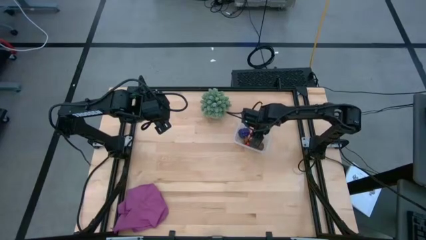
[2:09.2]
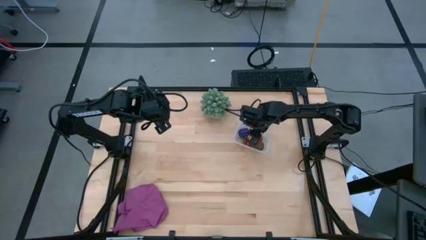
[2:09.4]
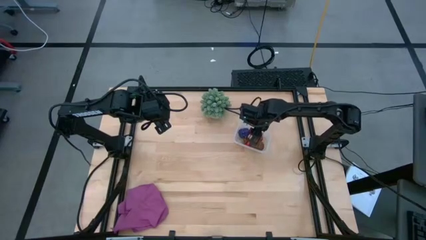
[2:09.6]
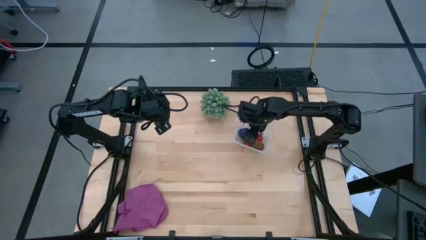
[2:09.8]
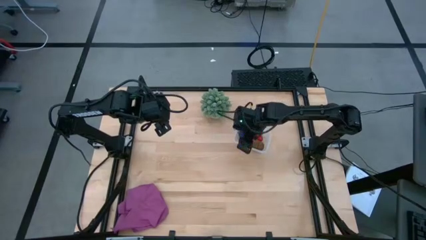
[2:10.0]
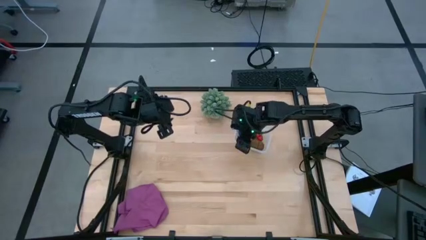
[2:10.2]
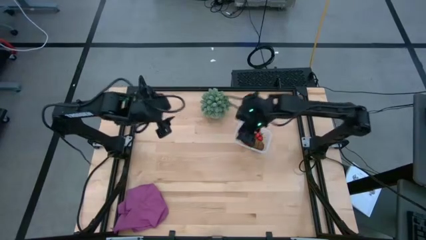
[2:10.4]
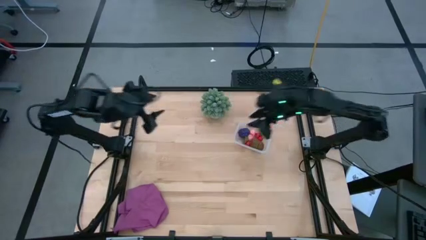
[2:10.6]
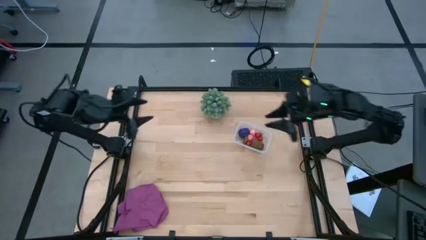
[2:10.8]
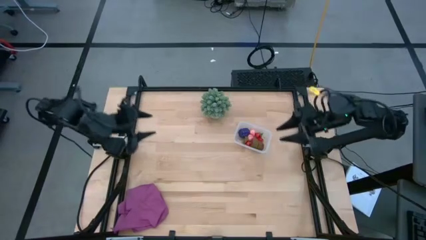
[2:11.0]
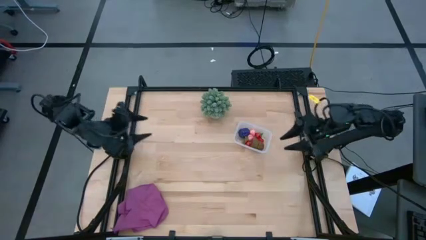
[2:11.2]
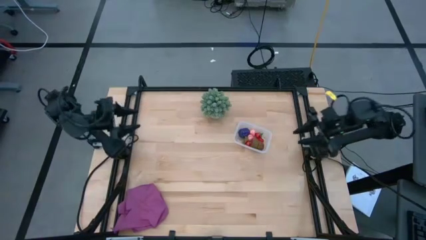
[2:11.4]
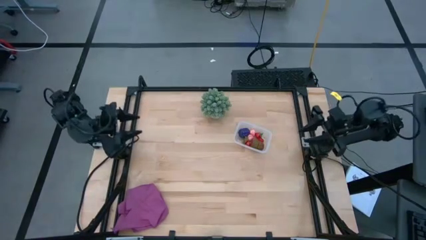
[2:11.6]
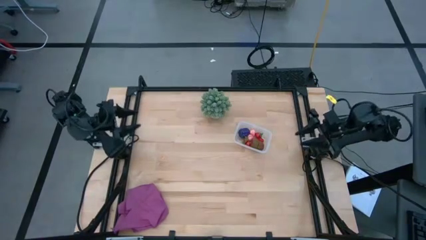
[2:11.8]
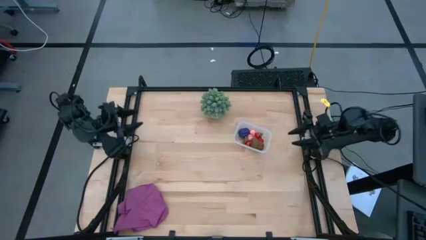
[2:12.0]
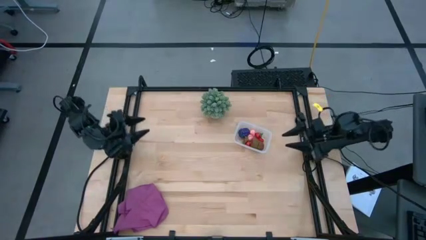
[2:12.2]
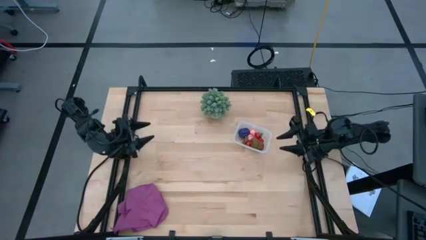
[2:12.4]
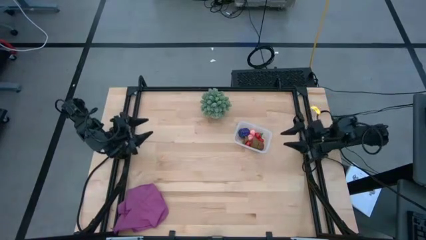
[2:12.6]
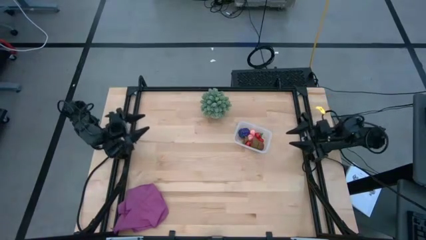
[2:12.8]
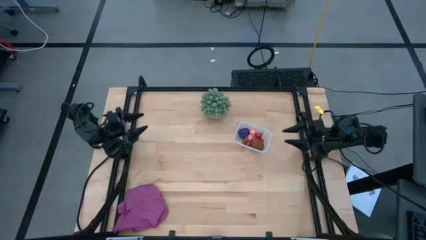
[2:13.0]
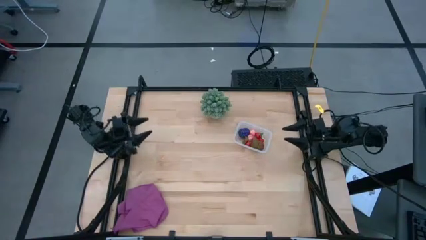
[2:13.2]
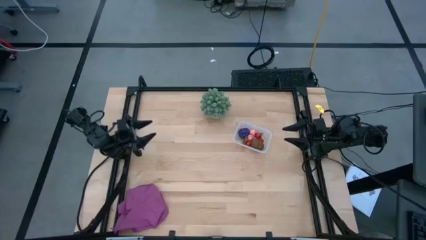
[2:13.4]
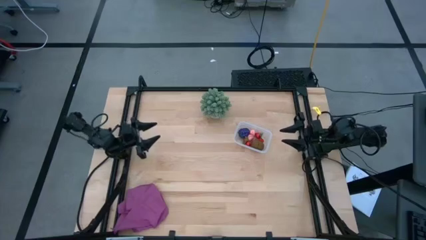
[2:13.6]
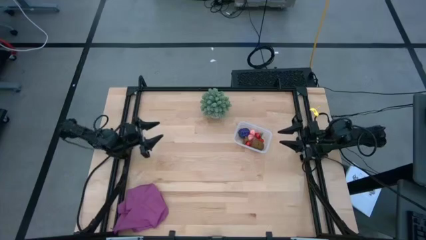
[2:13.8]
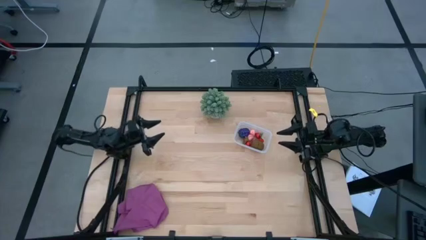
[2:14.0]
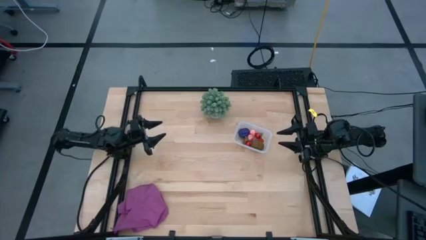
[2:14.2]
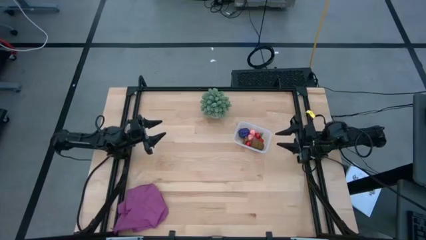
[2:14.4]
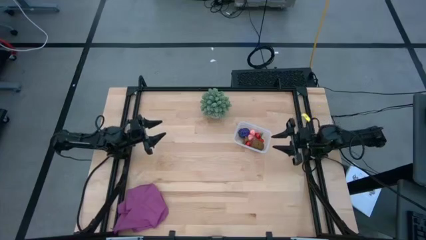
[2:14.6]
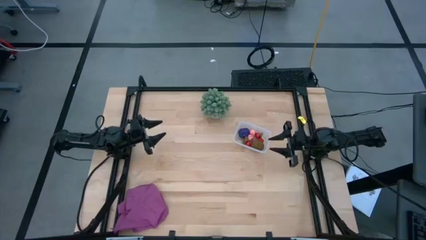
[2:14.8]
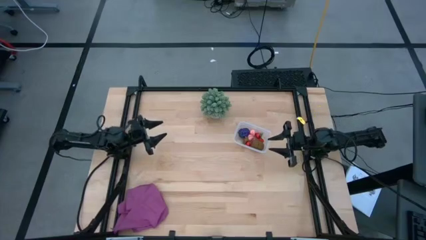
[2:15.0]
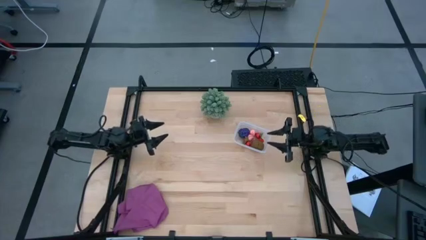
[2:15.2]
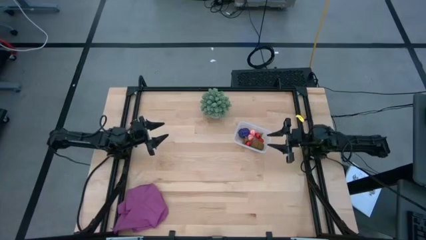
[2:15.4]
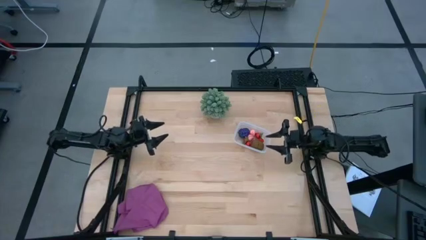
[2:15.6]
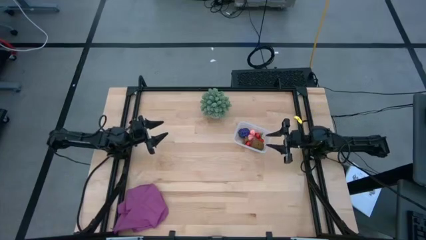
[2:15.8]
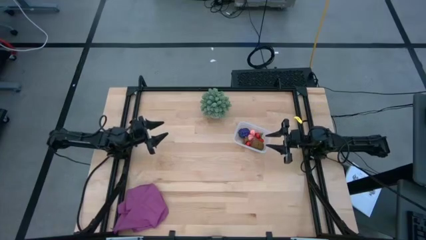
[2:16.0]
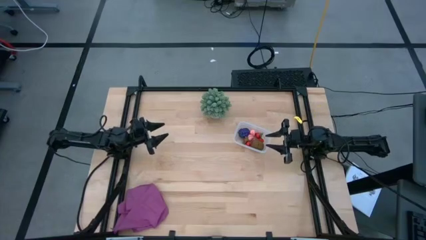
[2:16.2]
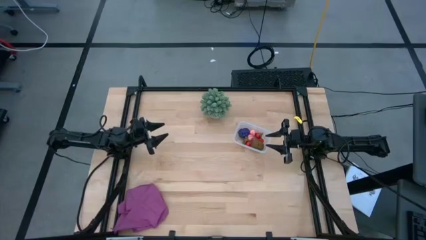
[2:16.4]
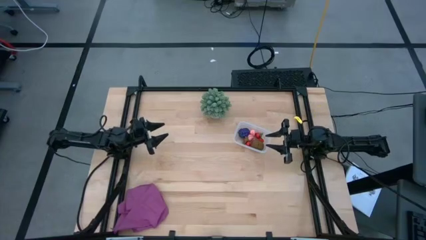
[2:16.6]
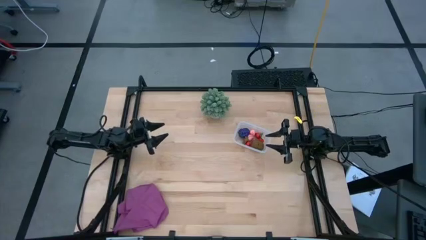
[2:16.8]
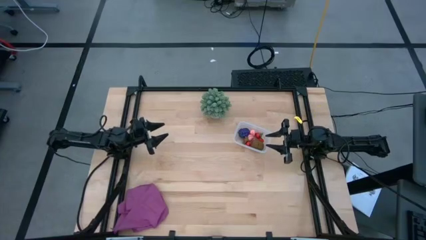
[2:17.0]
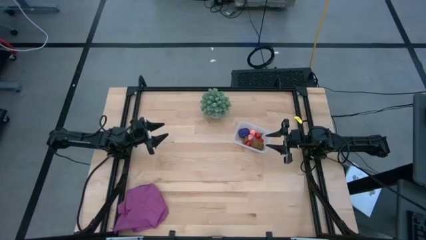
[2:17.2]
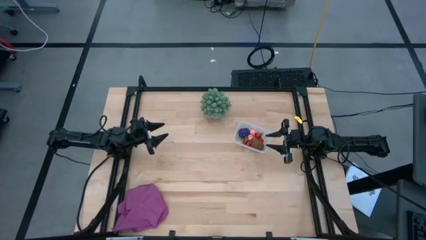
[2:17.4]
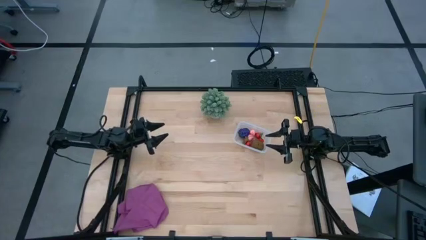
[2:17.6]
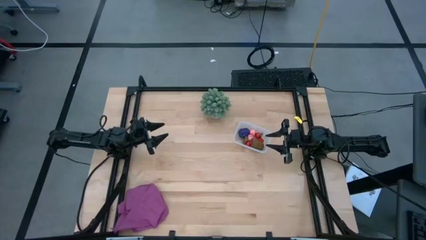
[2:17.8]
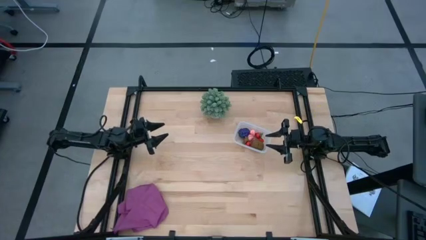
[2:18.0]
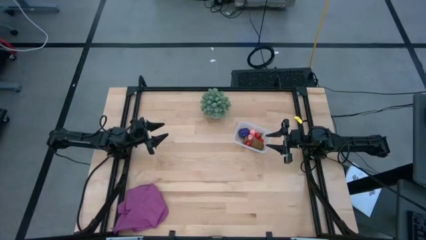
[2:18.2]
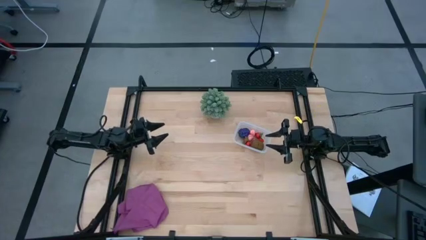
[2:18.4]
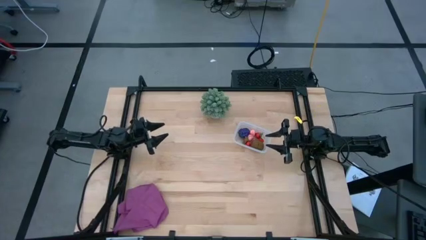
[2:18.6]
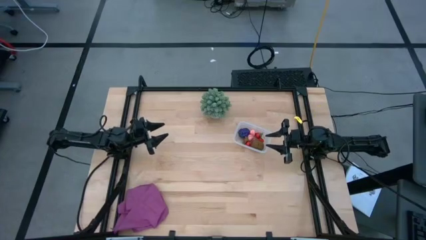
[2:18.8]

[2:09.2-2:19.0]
Task: Pick and placing Produce into tupperware
Return to Home Position

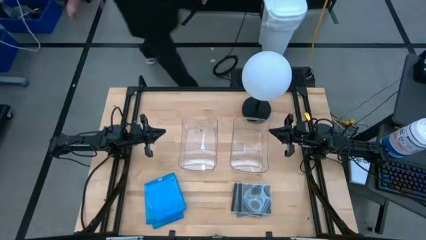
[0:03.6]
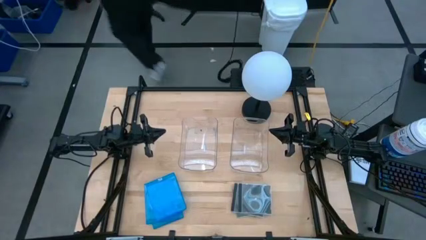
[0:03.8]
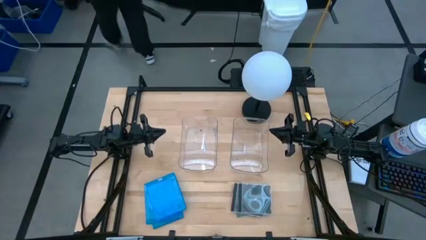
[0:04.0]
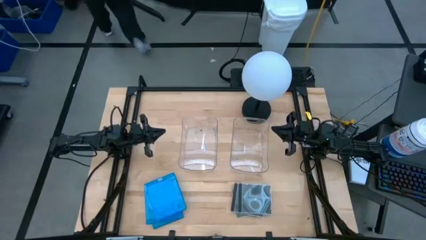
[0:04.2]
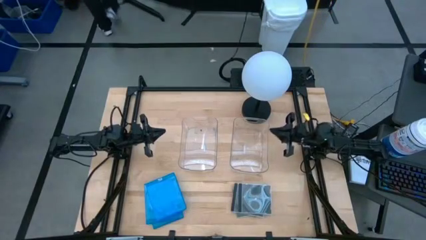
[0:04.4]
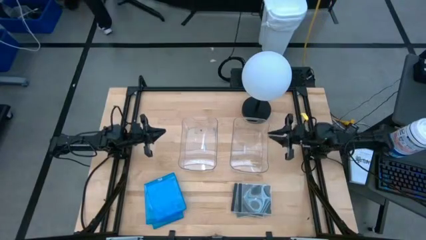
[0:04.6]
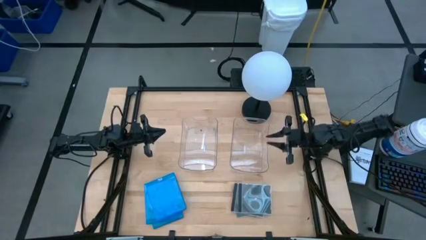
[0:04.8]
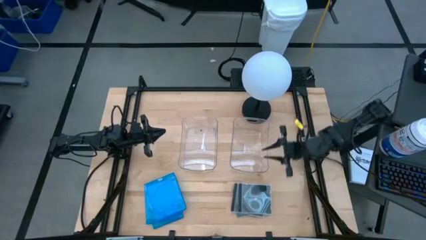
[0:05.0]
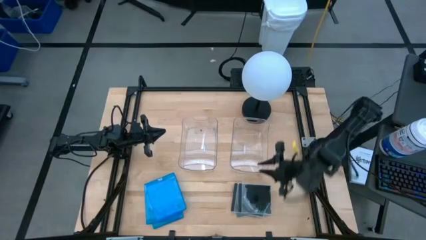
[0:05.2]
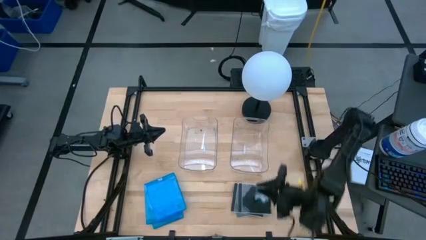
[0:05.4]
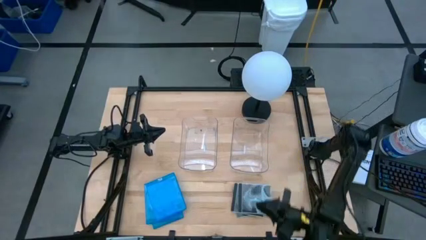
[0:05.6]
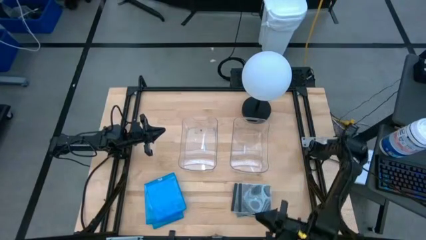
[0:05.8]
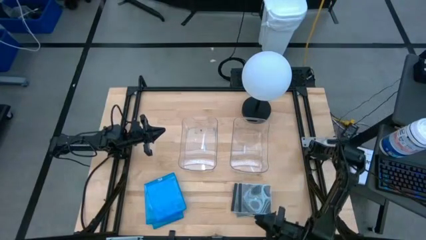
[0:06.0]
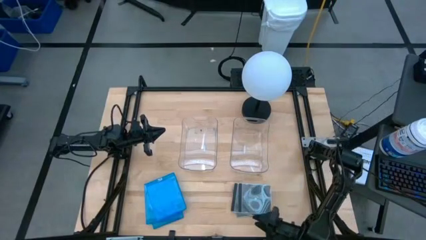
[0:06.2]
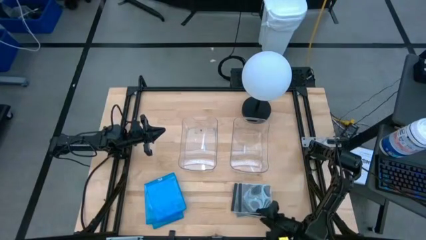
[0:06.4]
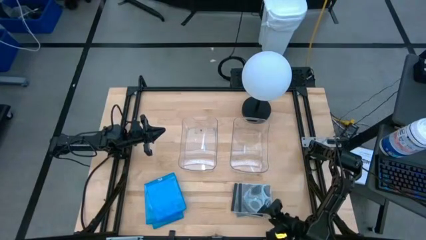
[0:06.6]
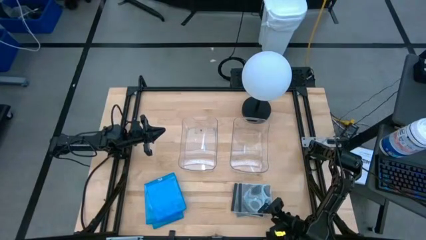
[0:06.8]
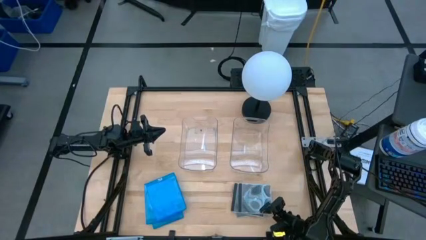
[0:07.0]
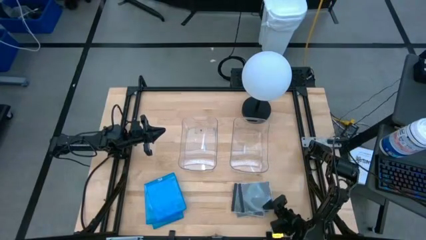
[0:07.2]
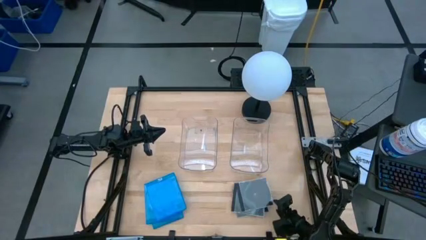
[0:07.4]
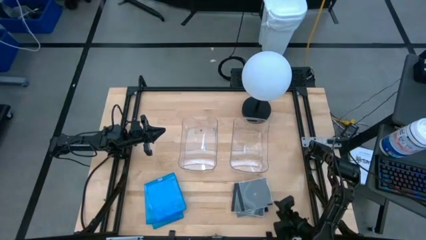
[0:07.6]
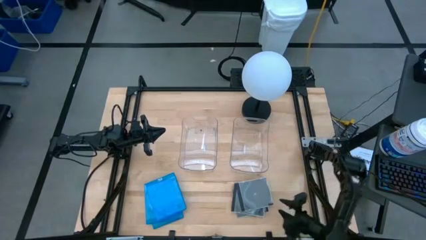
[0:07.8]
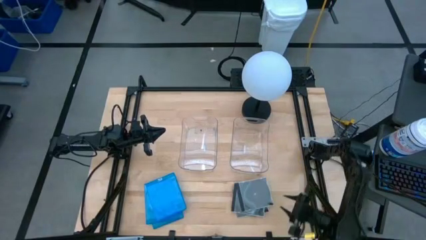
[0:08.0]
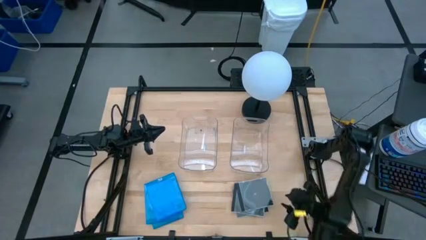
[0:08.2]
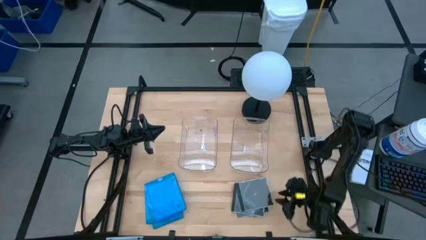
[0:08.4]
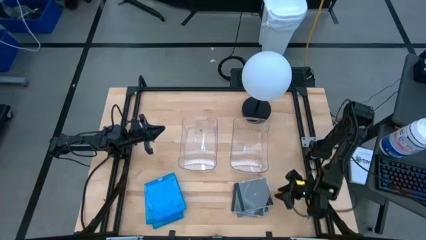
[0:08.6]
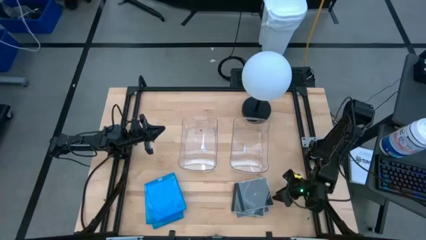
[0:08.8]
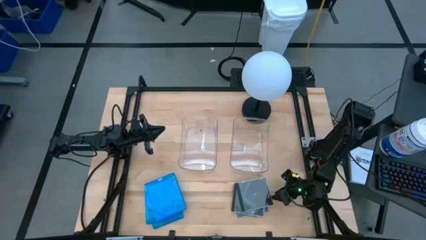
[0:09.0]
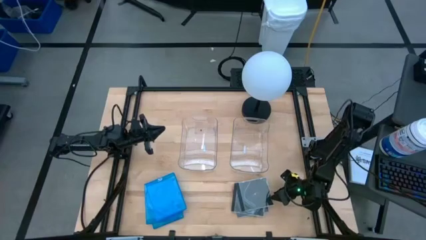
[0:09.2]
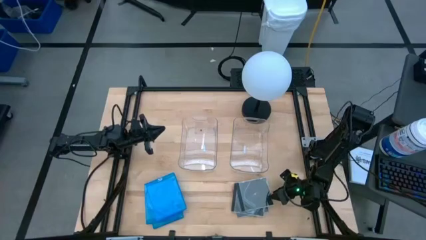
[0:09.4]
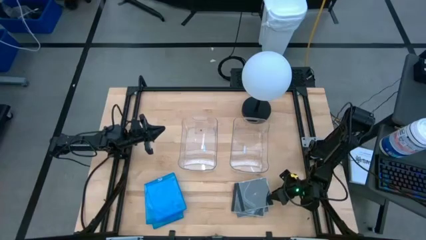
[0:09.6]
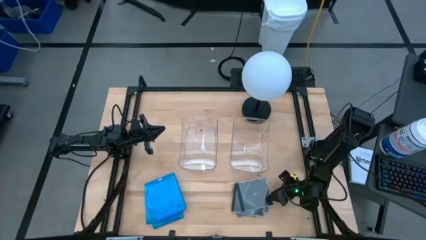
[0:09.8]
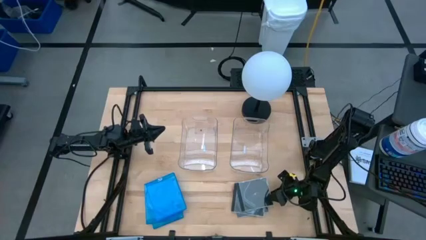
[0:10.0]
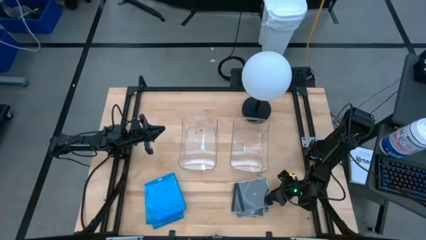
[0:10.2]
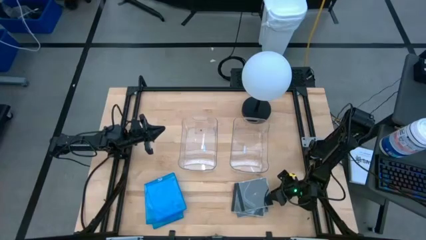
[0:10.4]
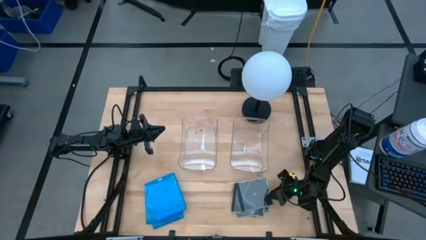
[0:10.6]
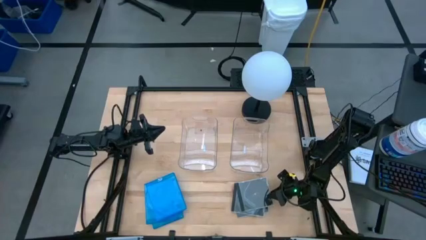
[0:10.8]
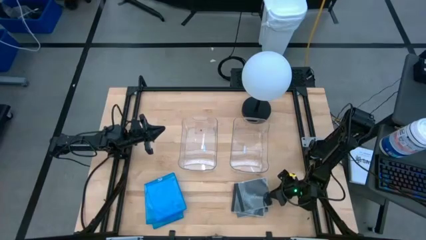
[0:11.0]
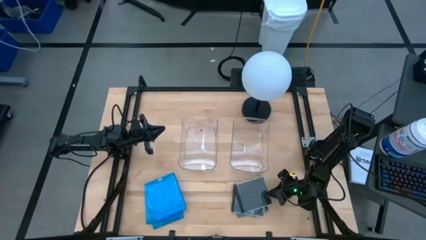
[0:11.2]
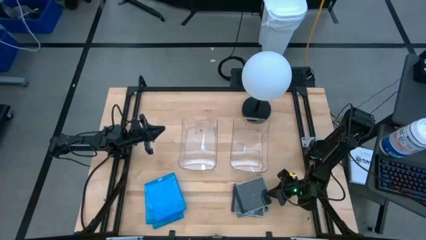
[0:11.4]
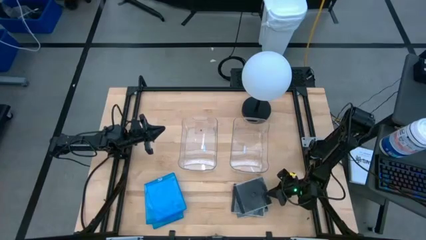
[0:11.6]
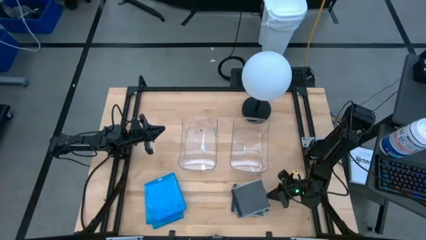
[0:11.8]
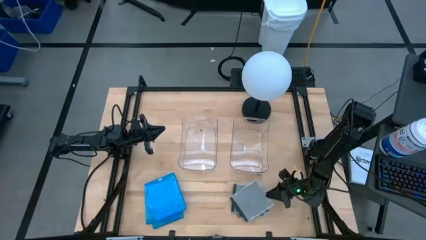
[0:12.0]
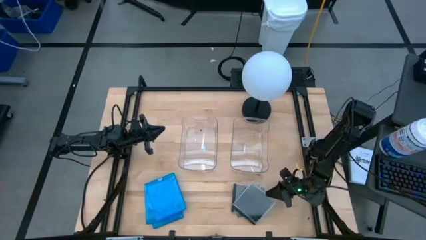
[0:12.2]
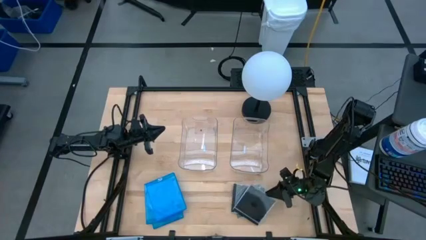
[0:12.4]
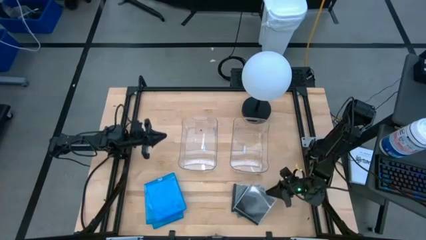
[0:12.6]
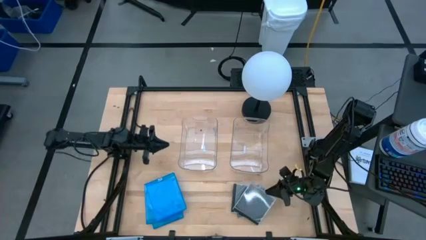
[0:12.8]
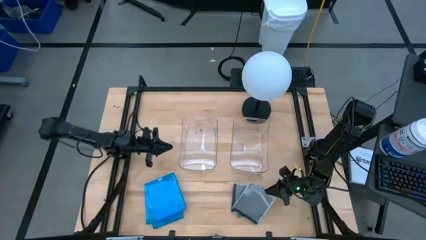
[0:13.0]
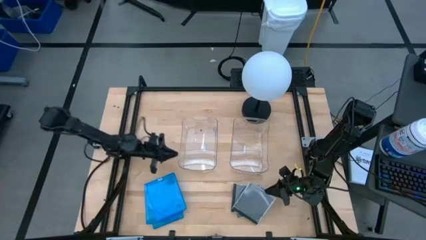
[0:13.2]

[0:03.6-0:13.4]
Task: Pick & place jewel cases by type
Put the black cd case into the right transparent bin
